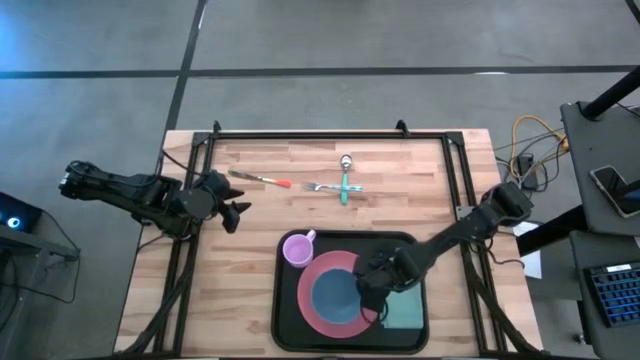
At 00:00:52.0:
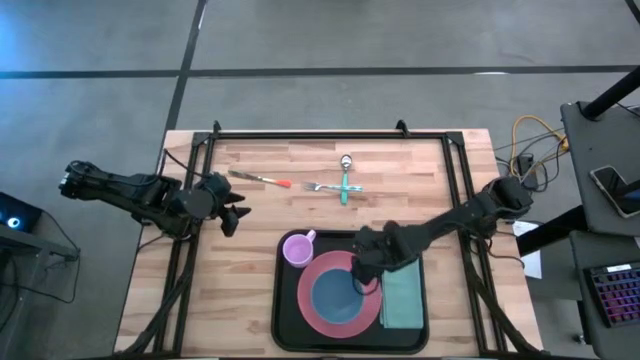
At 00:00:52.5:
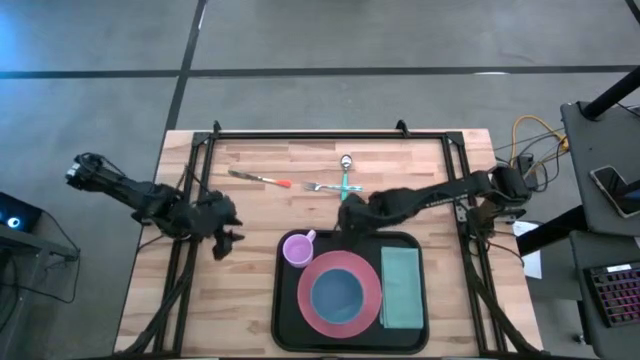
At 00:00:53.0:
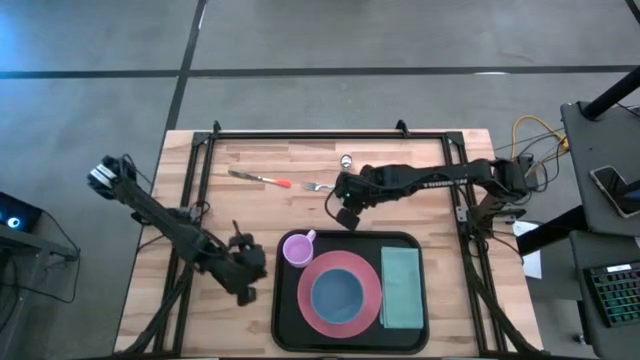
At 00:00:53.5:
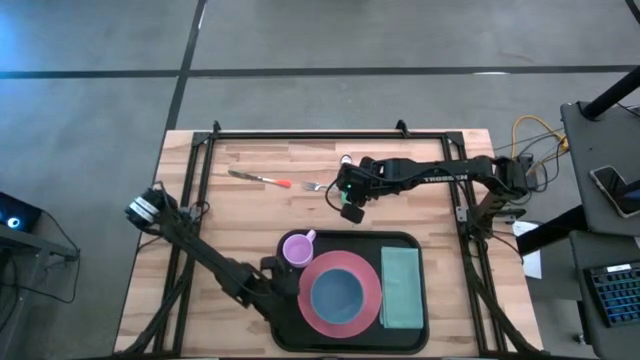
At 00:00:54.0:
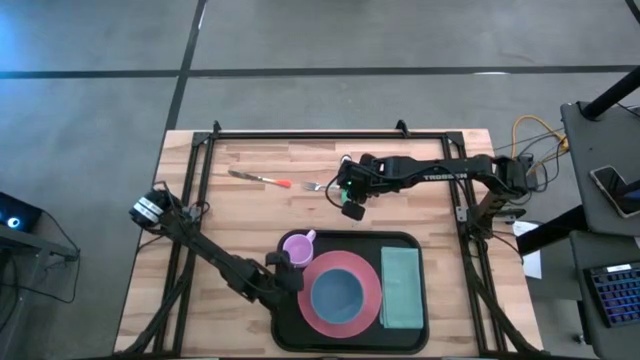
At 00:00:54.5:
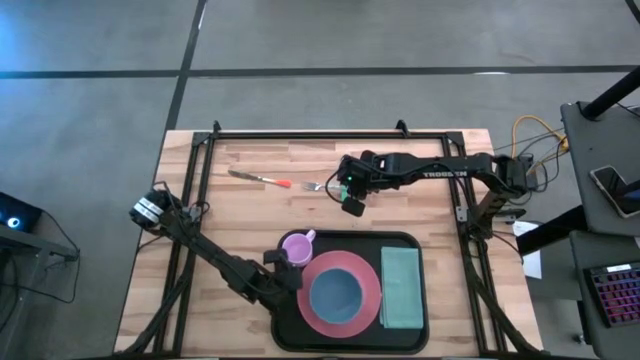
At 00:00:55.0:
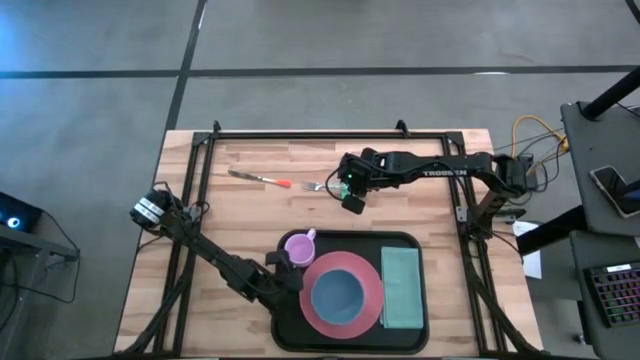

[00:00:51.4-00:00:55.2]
Task: Set up tray
Adjust the pink plate on the black tray

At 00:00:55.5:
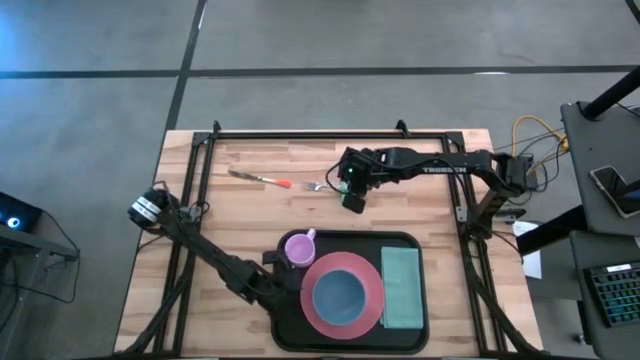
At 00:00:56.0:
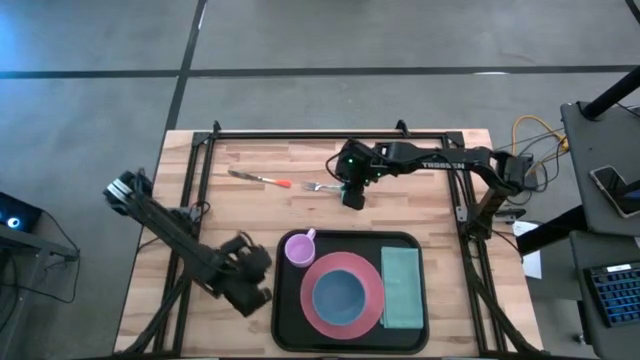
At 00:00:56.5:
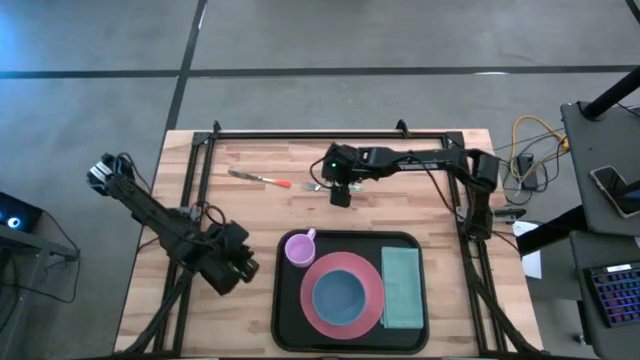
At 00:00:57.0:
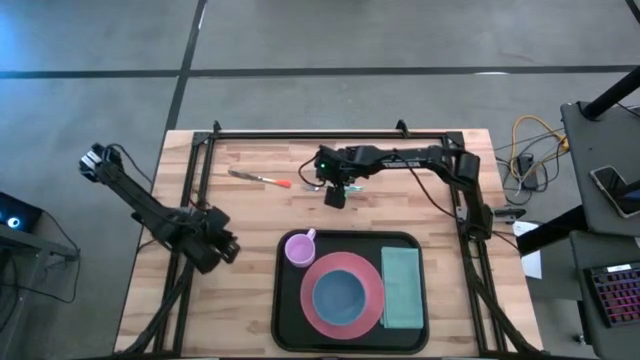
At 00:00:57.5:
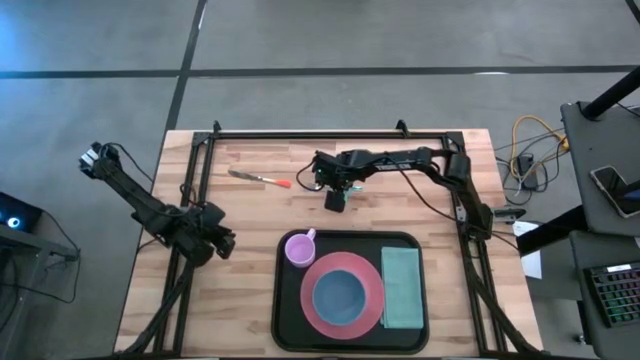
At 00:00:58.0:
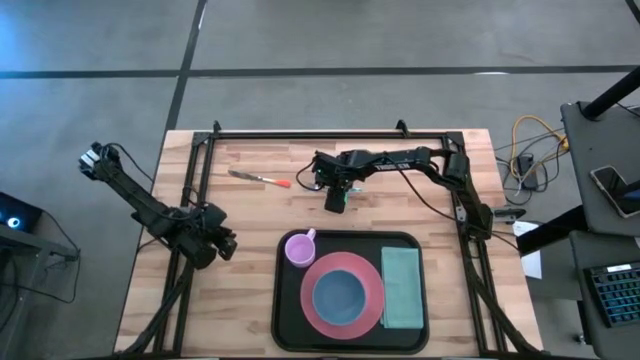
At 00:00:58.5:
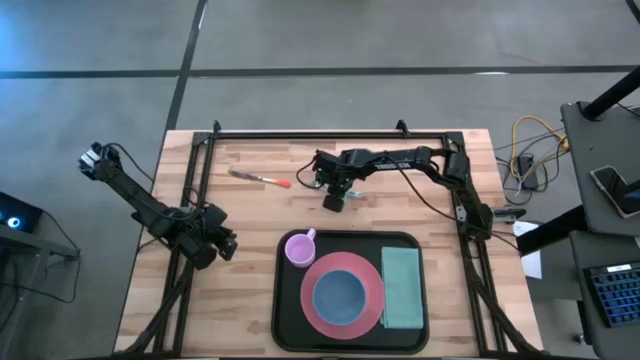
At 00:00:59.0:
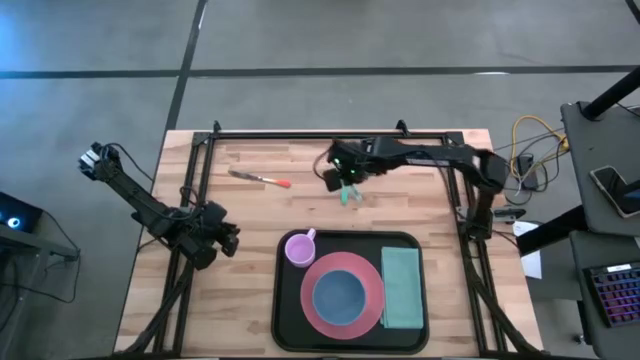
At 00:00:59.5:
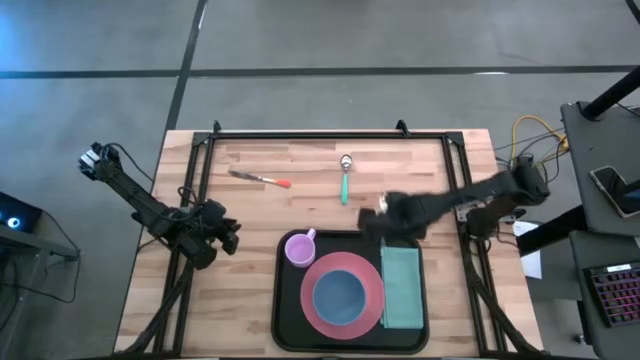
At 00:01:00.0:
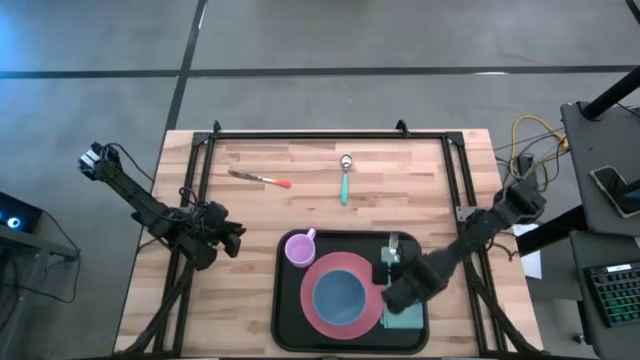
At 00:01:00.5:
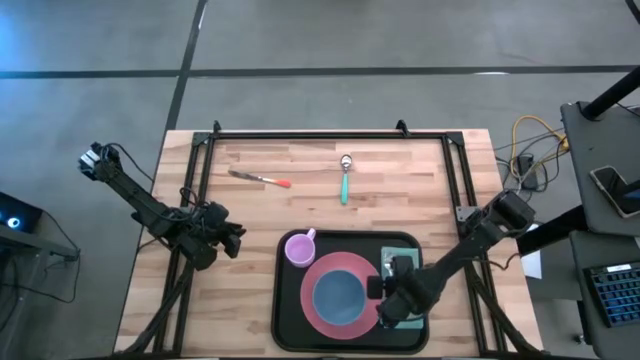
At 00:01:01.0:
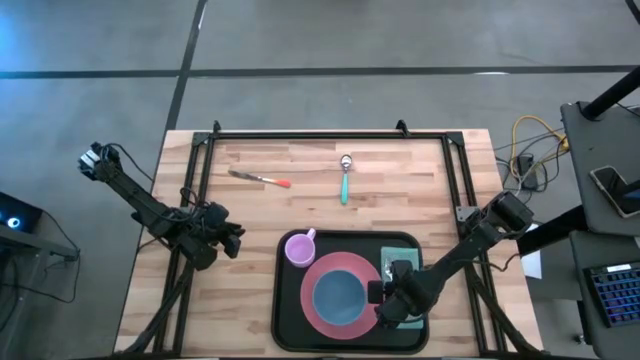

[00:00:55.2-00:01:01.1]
Put the blue fork on the blue napkin to the right of the pink plate

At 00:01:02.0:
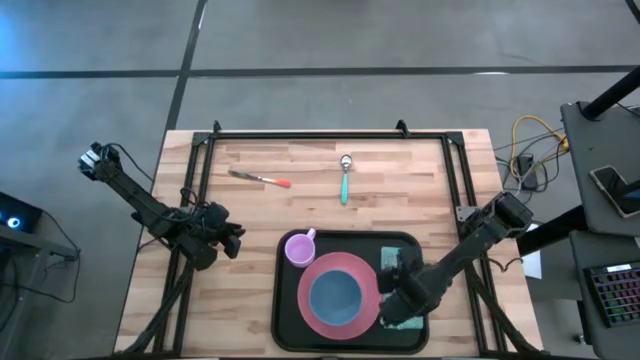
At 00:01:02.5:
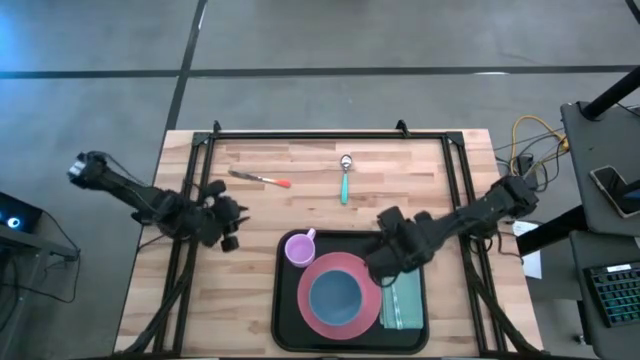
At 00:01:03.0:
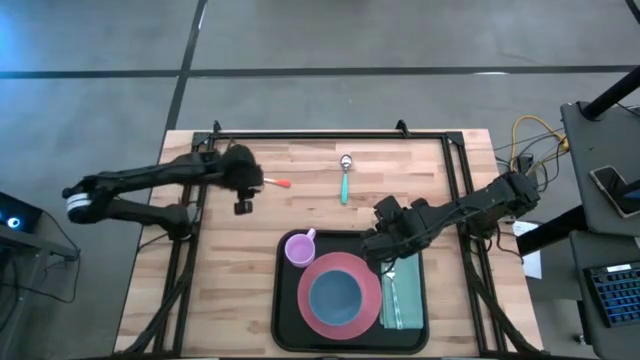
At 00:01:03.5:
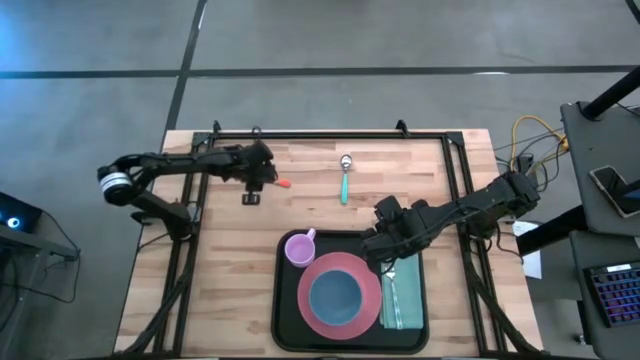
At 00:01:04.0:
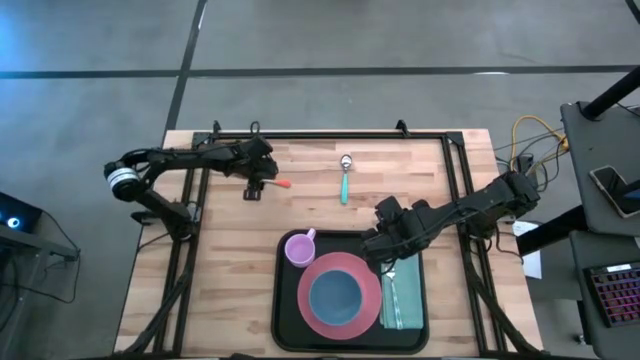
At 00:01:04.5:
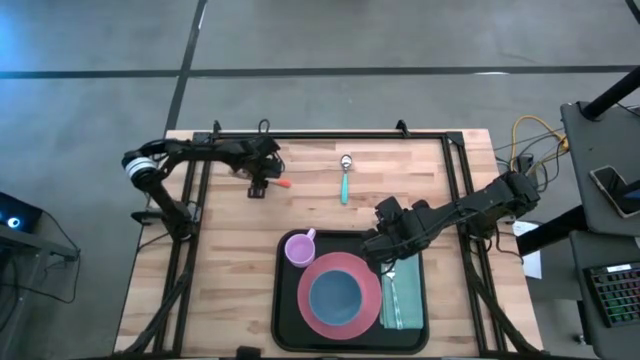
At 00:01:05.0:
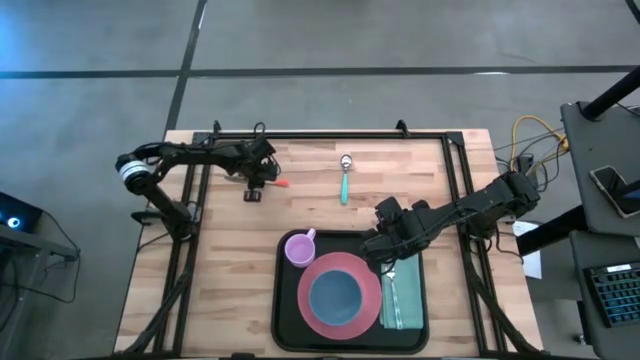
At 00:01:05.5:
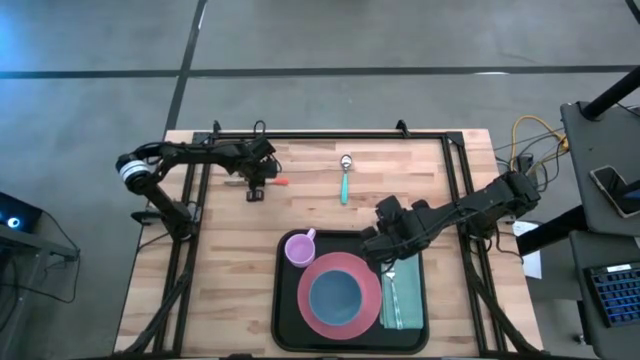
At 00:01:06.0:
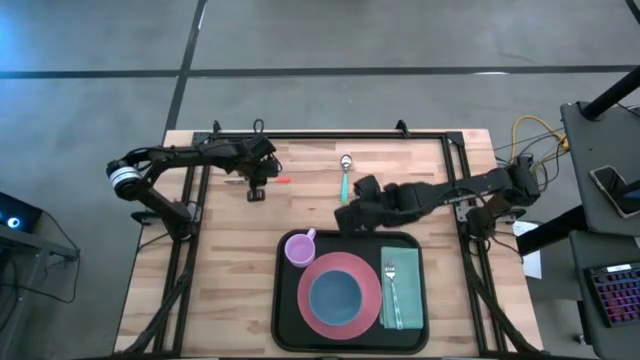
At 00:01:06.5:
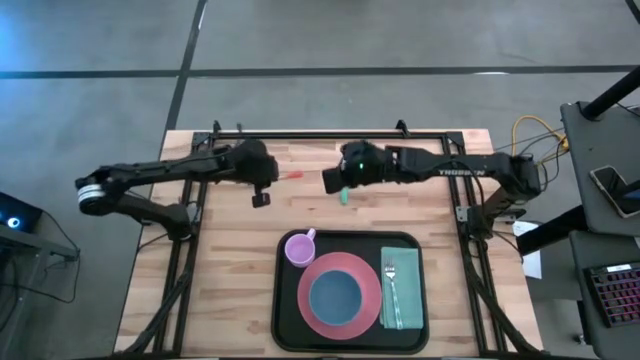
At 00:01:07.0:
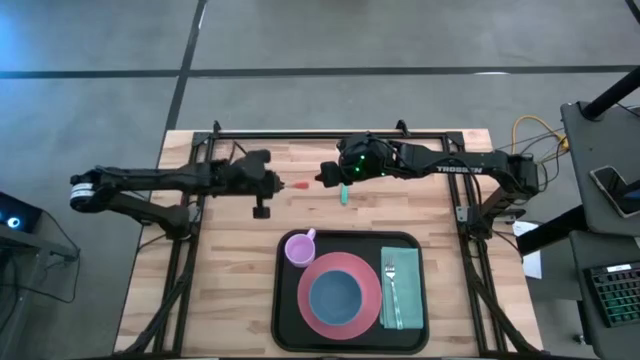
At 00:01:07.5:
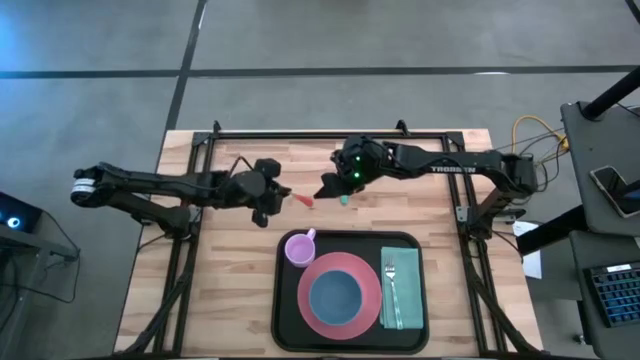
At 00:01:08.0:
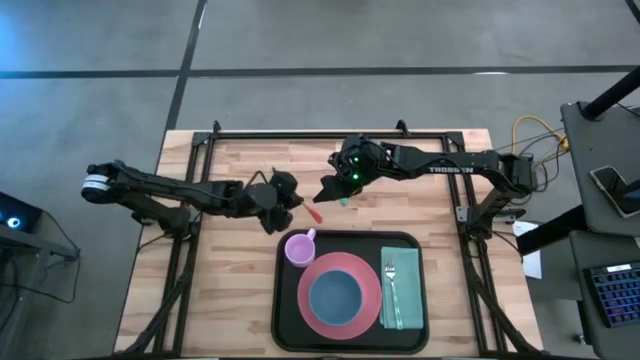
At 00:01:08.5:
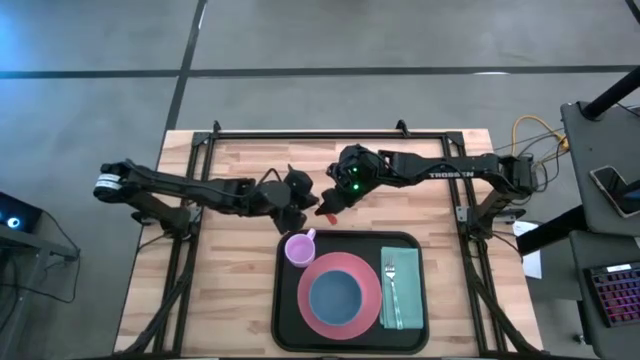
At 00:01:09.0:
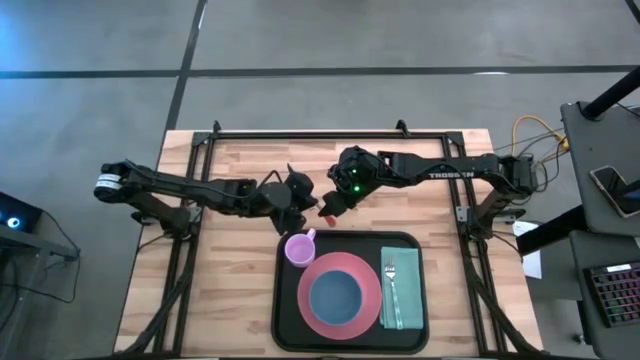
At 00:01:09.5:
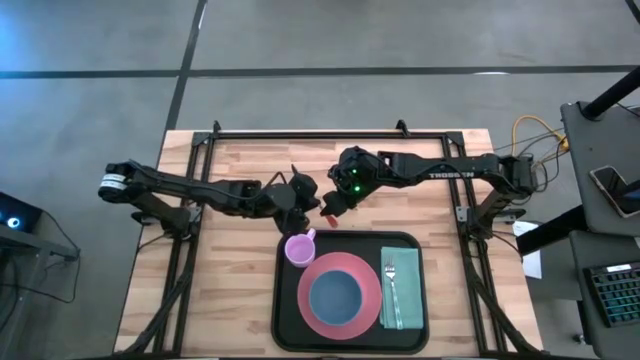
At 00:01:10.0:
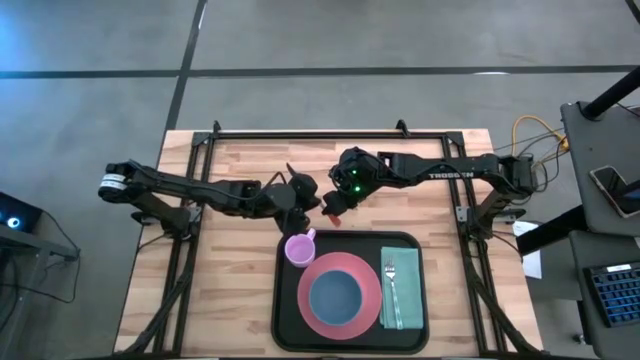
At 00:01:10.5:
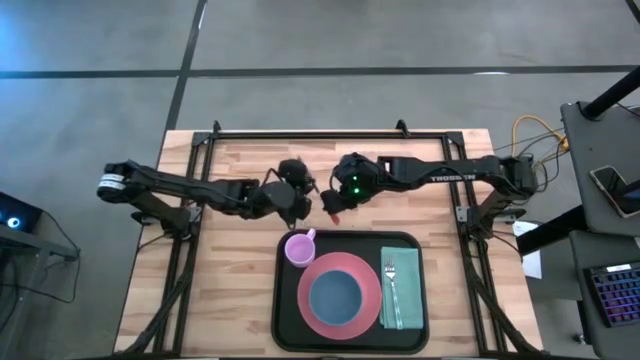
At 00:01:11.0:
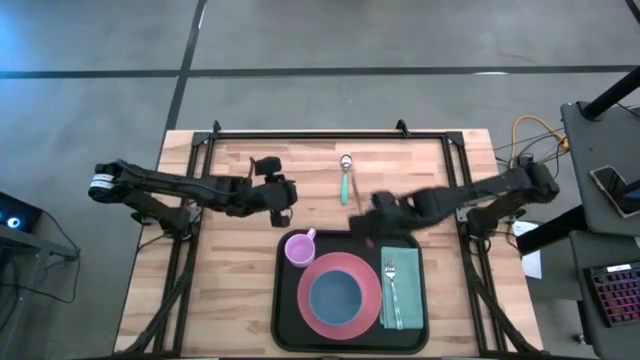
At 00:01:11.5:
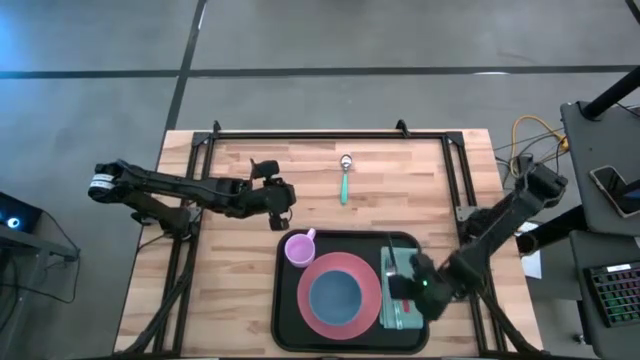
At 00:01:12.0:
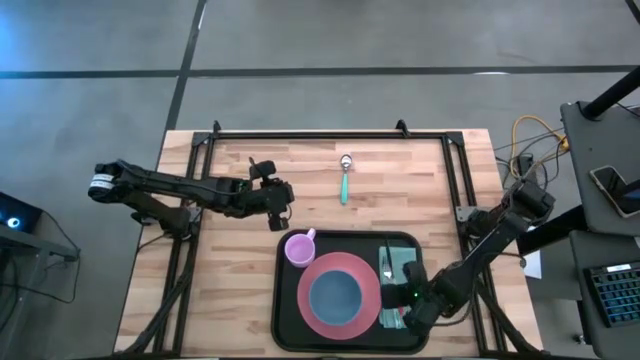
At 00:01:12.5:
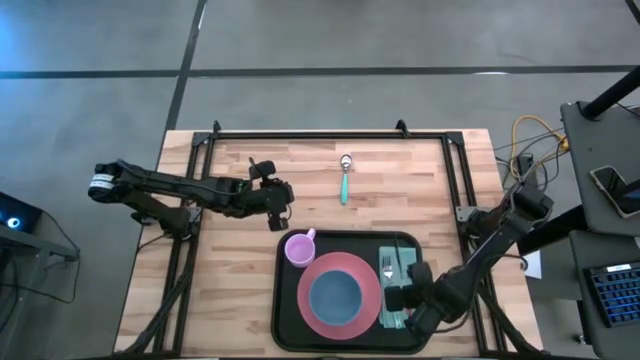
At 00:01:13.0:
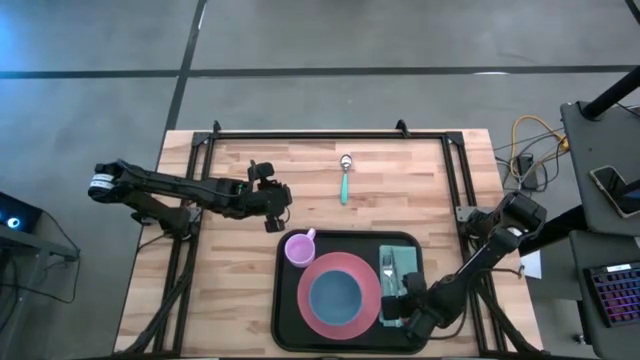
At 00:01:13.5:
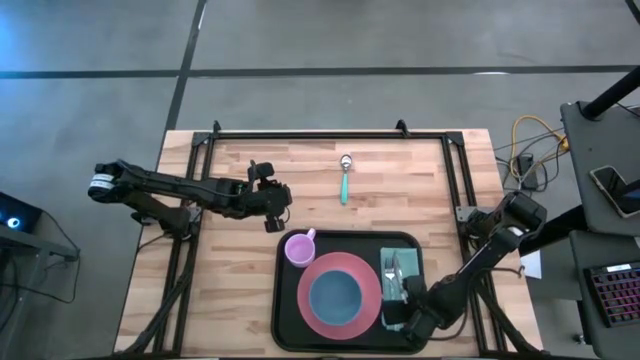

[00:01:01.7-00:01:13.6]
Put the orange knife on the blue napkin to the right of the blue fork
